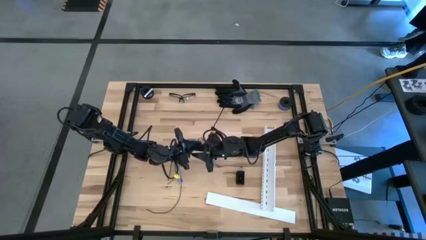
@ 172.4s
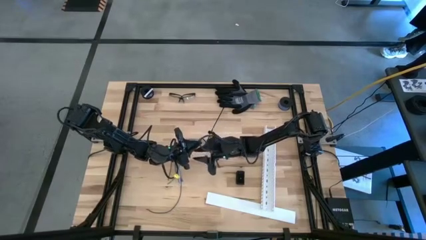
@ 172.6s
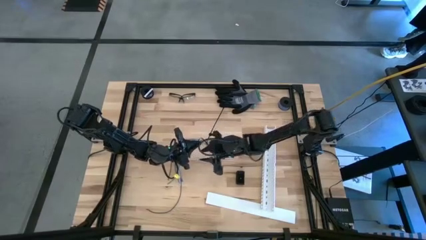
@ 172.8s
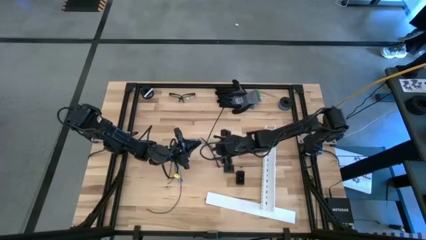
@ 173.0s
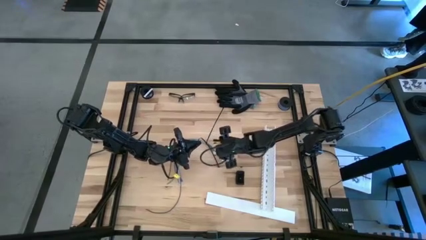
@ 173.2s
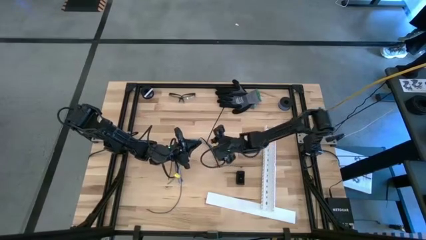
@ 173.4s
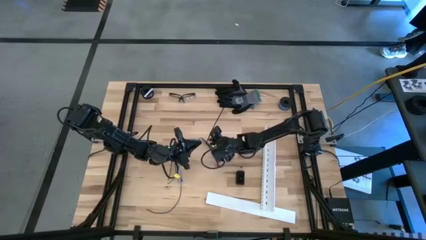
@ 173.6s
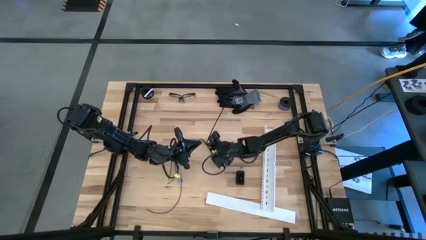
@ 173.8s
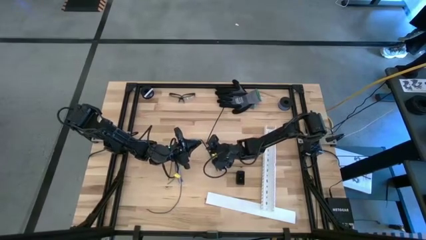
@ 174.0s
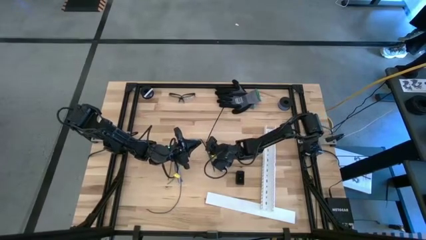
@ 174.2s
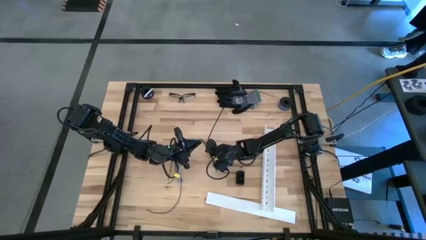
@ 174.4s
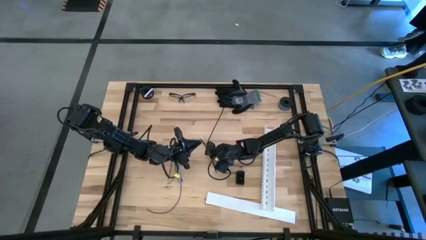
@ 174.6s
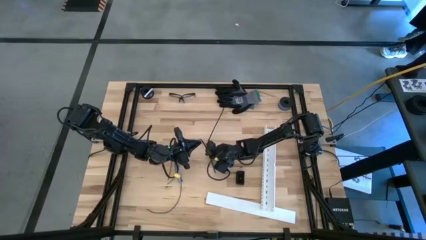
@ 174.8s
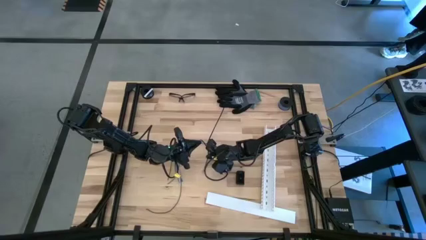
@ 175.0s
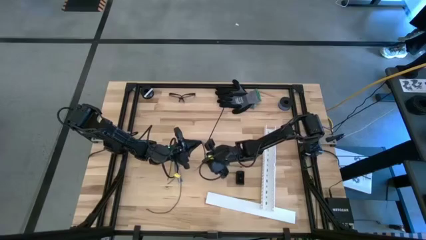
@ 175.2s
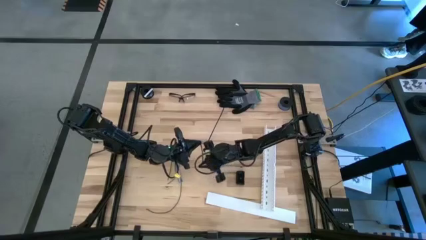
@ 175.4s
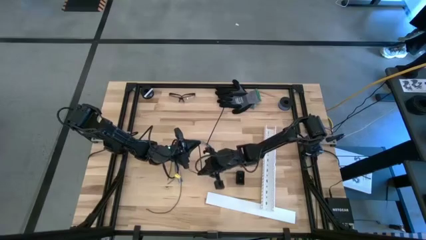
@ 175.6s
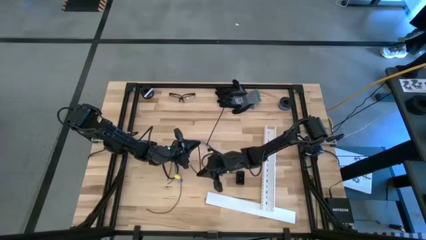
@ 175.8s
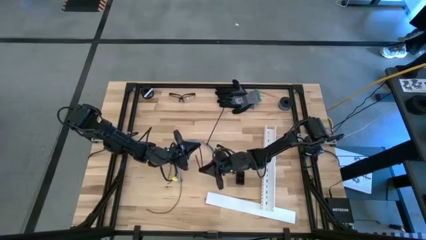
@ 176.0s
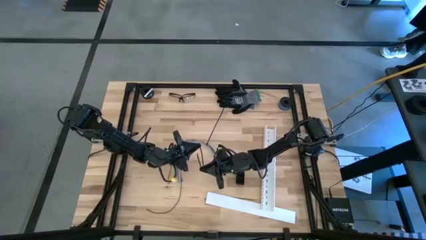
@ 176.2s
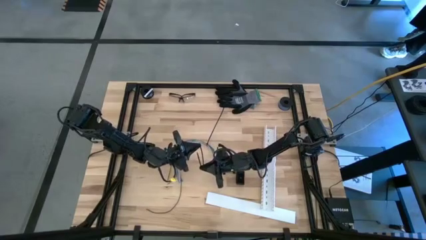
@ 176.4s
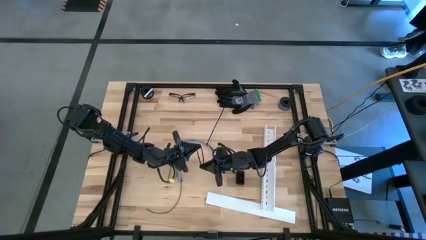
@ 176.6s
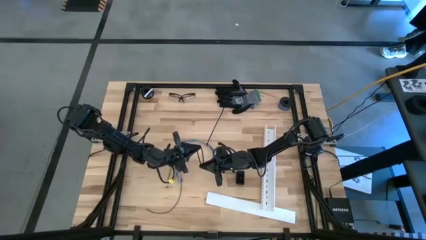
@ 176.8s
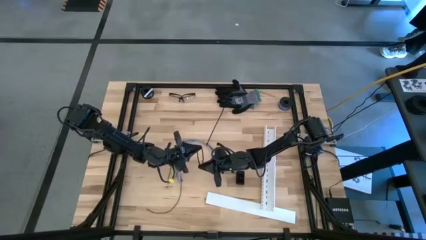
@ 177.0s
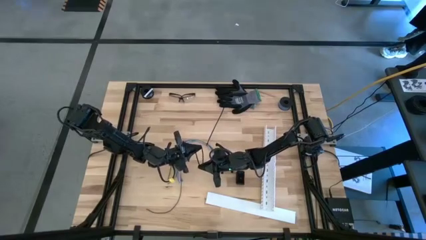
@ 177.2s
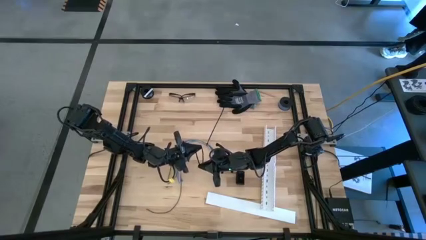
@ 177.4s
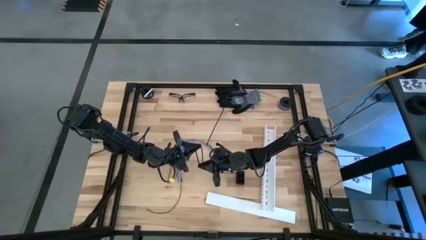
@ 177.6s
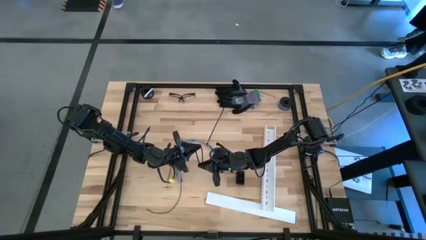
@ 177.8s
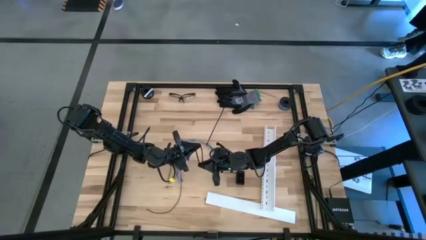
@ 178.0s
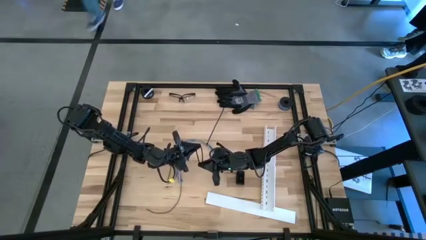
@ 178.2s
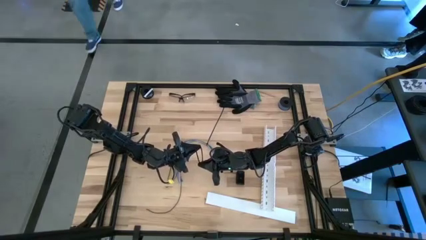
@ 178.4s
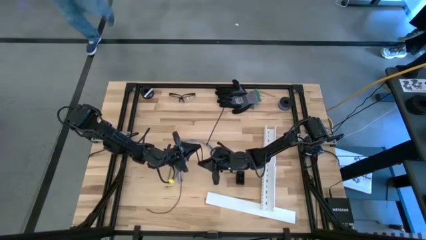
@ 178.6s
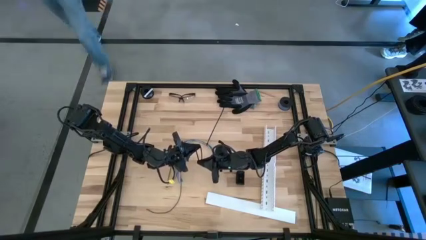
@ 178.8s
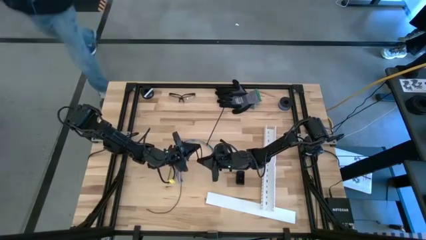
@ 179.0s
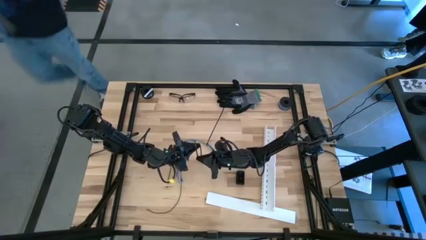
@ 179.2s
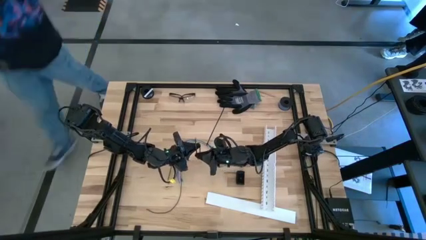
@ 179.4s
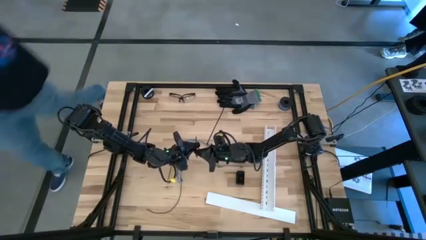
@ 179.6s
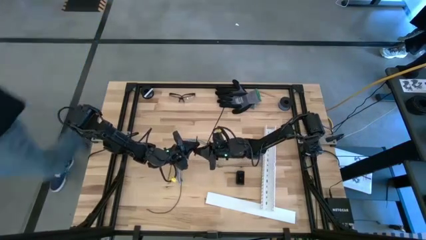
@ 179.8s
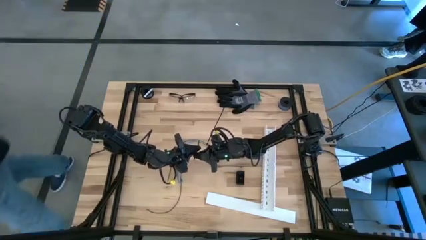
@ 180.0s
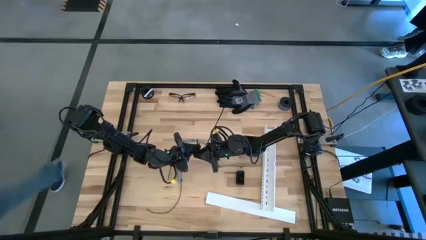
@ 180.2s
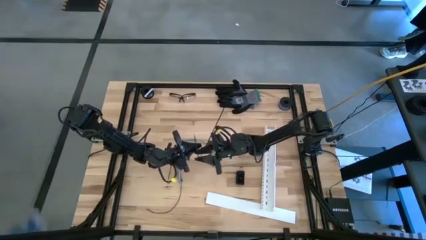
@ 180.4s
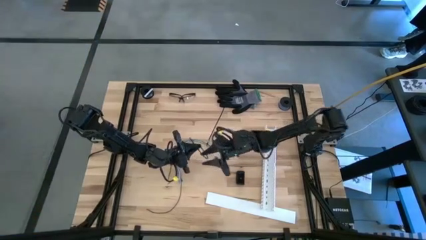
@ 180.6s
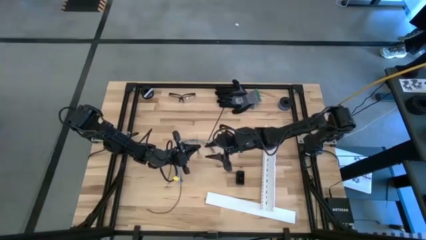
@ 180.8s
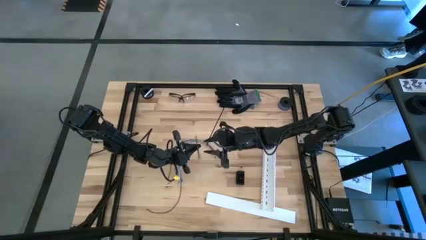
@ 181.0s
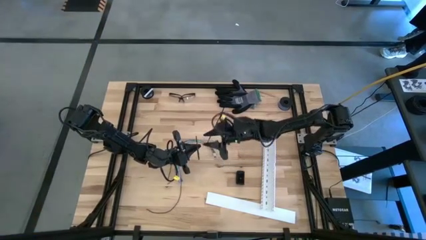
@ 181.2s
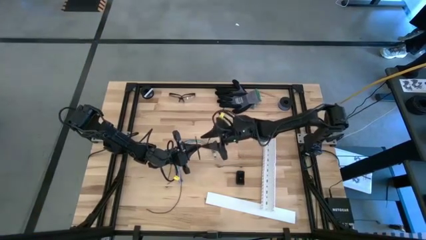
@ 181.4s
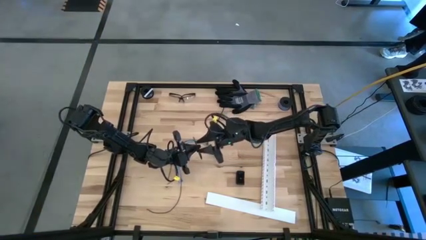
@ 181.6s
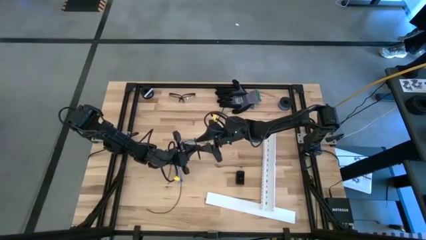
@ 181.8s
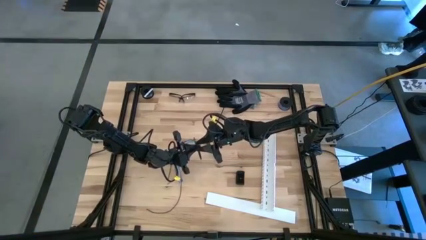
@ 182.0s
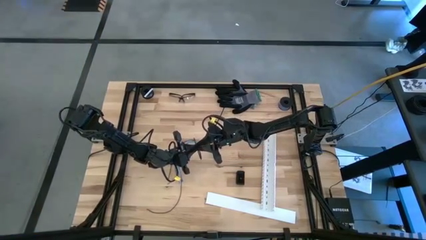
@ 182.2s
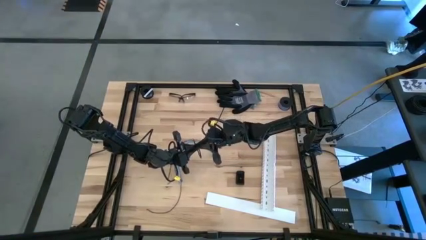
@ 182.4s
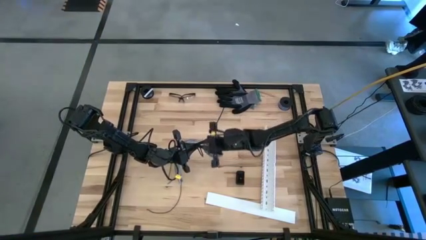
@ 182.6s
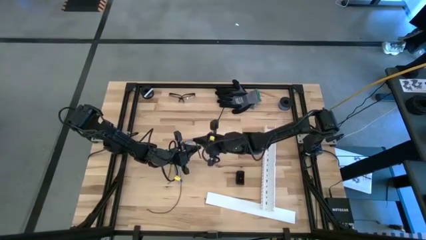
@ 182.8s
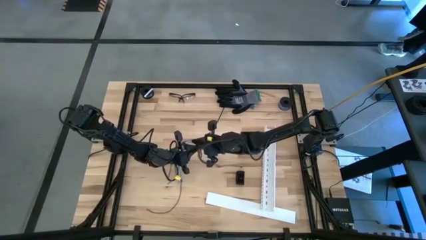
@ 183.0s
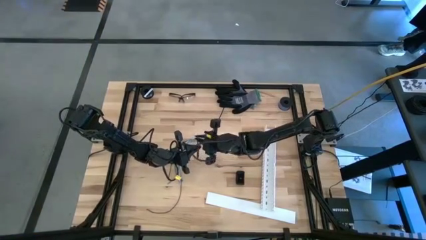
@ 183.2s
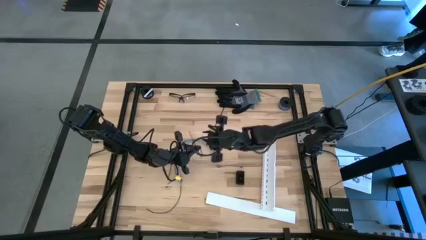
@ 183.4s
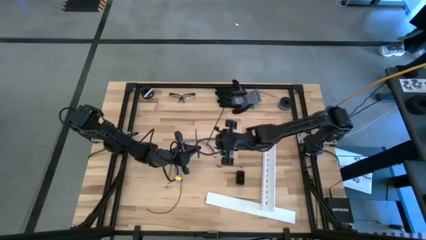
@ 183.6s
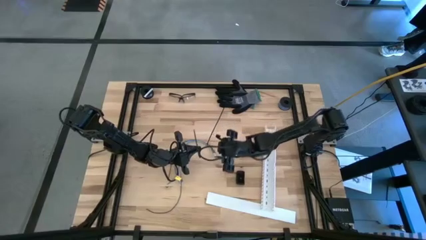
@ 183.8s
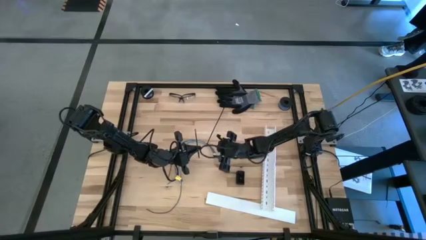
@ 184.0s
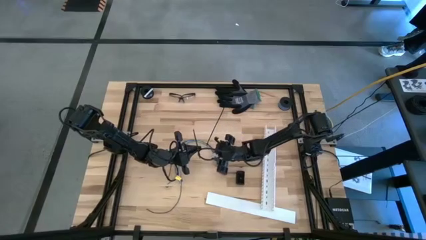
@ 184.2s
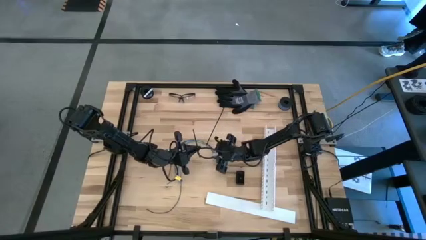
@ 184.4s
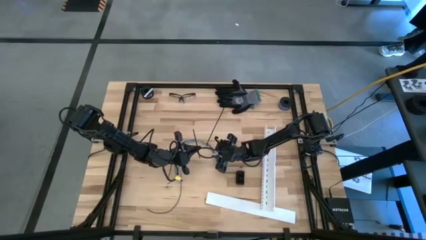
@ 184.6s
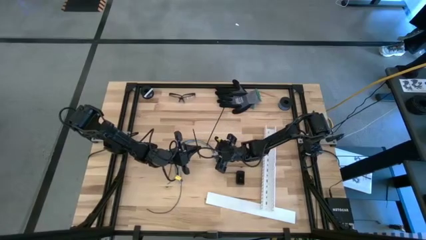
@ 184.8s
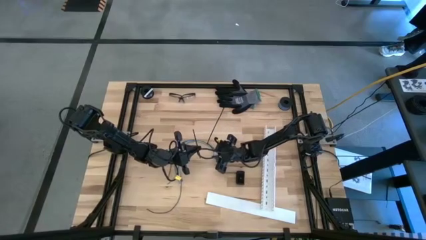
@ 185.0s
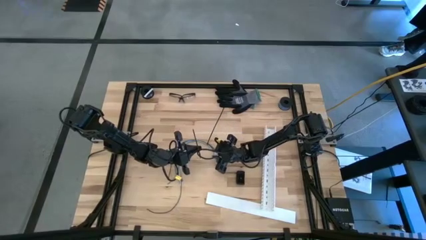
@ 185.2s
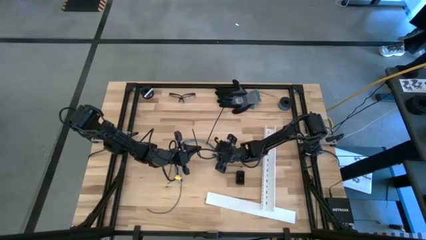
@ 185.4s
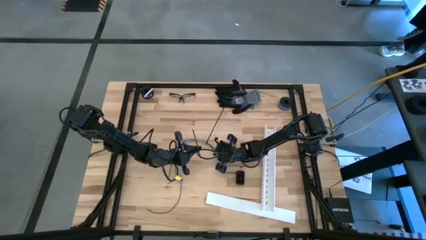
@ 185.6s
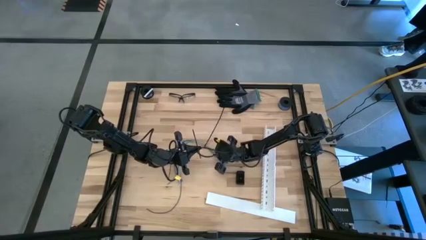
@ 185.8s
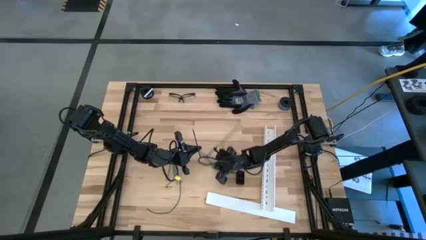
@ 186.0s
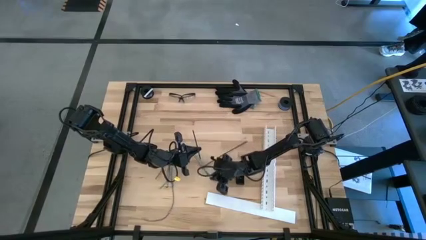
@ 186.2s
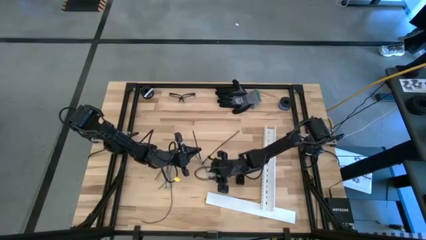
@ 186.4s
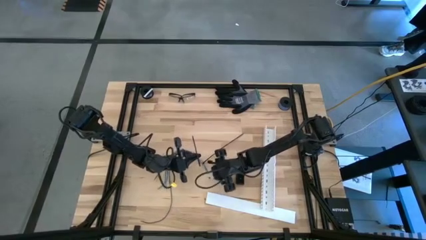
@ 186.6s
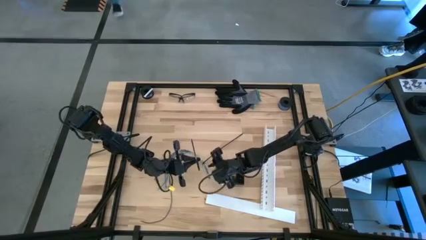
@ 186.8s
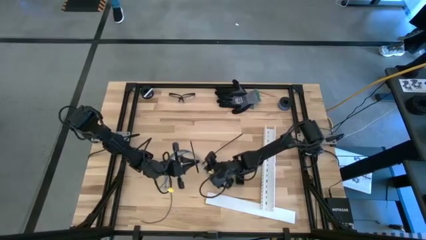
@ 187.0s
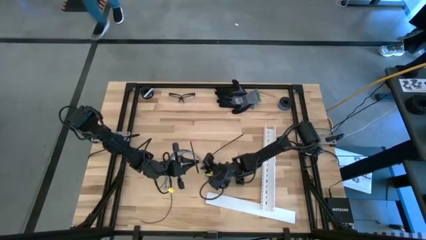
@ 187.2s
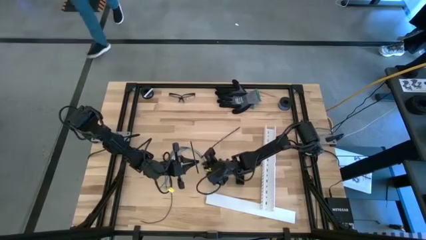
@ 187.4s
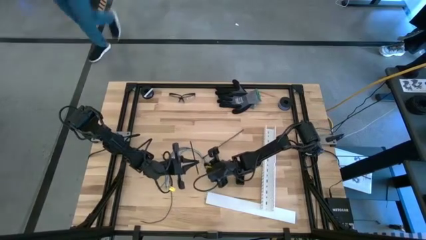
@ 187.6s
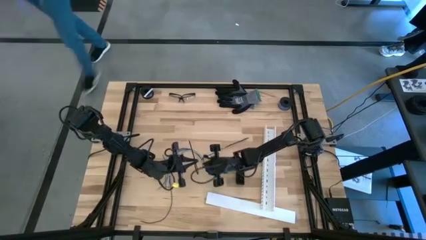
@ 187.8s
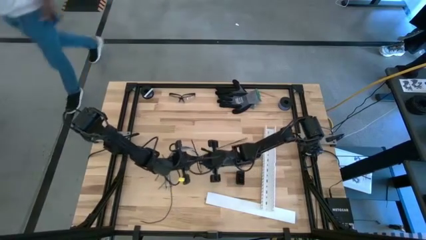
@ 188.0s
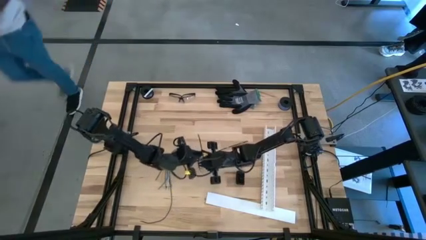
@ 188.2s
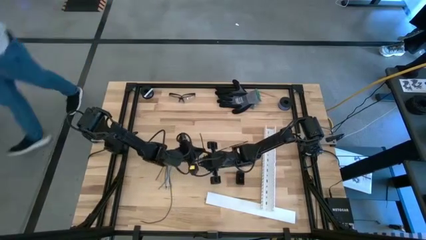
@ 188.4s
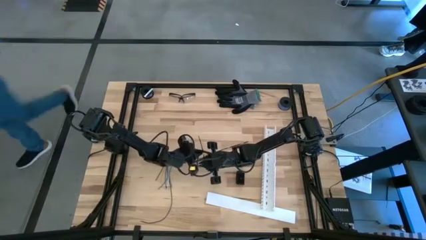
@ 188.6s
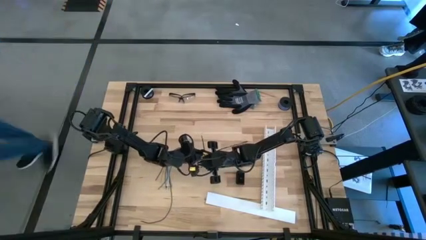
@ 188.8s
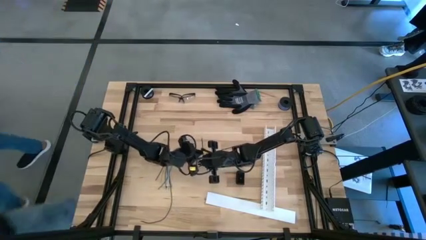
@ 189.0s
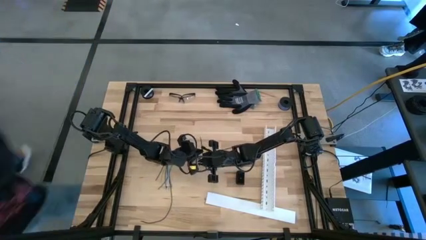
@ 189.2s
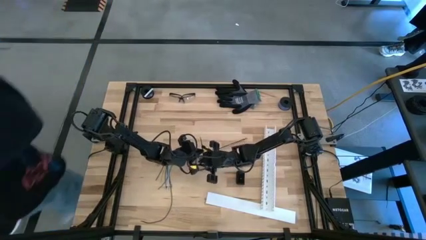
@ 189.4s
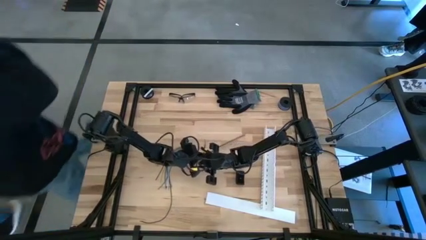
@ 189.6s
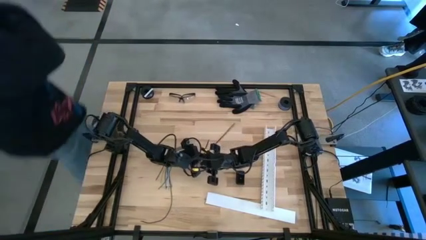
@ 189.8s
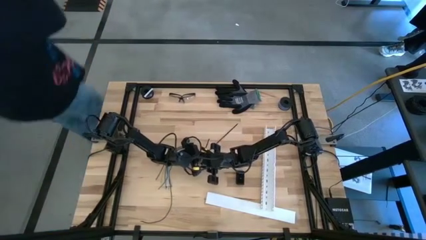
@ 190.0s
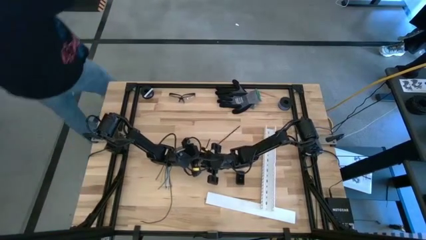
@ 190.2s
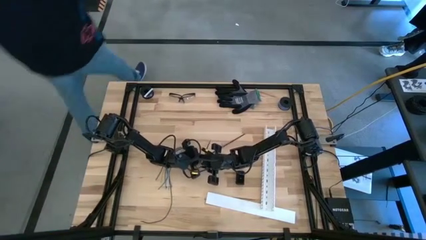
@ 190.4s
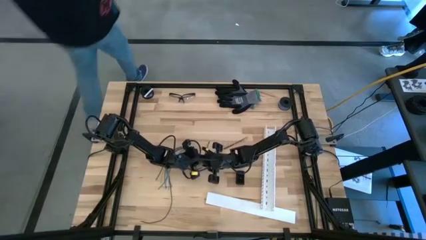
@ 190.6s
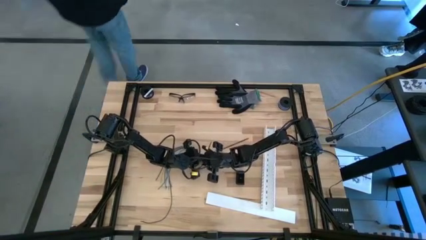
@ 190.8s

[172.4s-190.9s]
Task: Ziptie cables
Wrap the cable wires with the black zip tie
